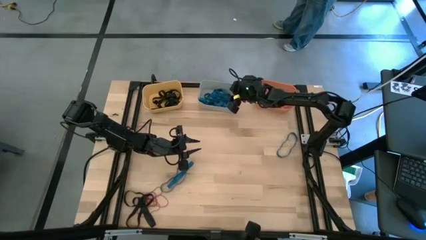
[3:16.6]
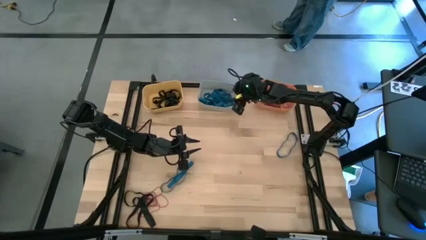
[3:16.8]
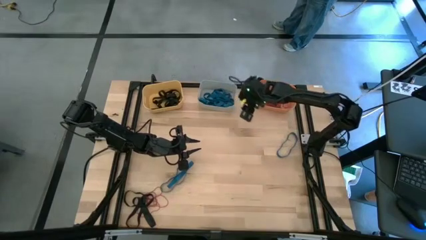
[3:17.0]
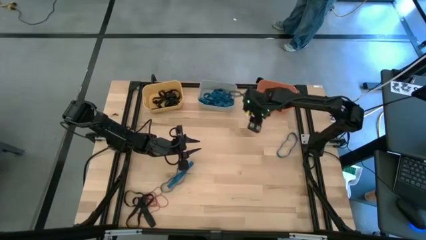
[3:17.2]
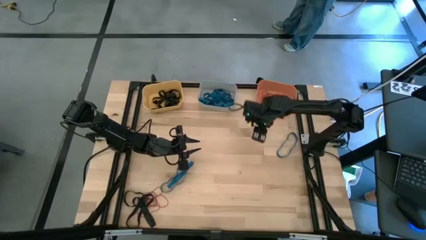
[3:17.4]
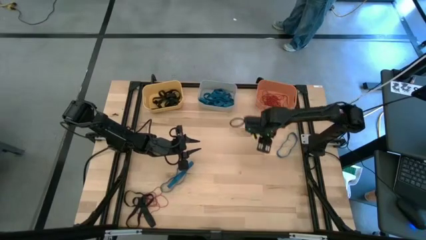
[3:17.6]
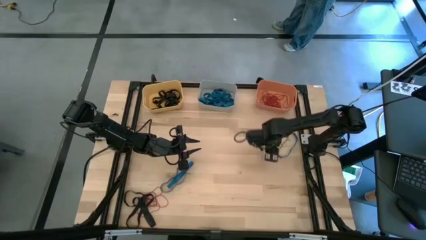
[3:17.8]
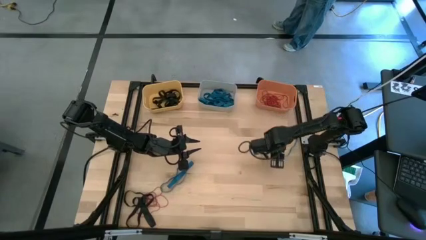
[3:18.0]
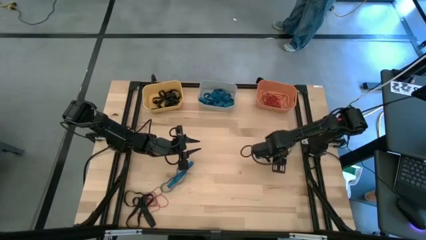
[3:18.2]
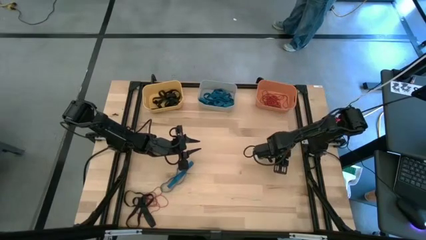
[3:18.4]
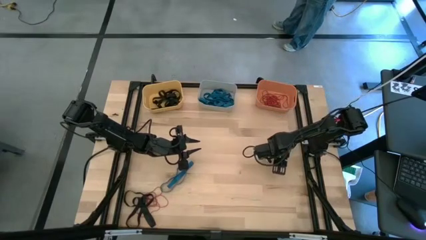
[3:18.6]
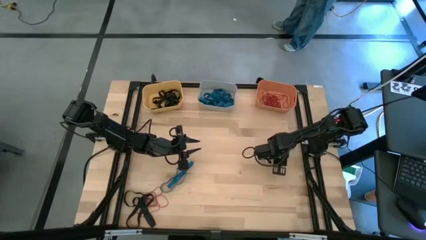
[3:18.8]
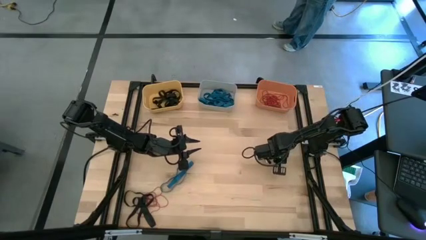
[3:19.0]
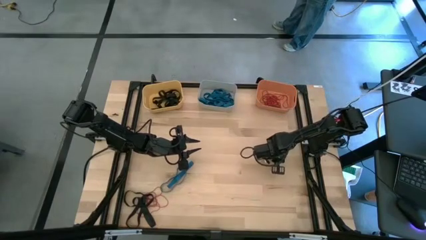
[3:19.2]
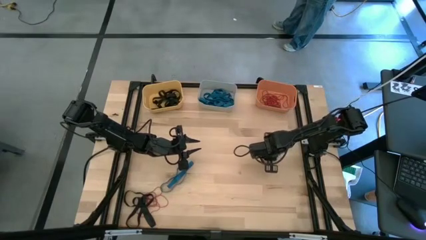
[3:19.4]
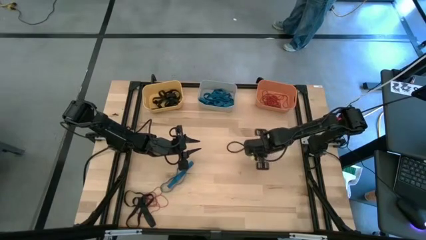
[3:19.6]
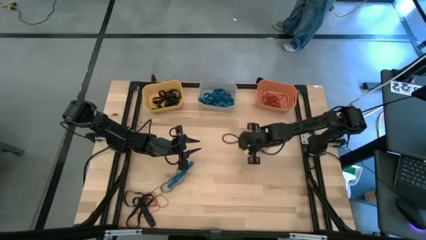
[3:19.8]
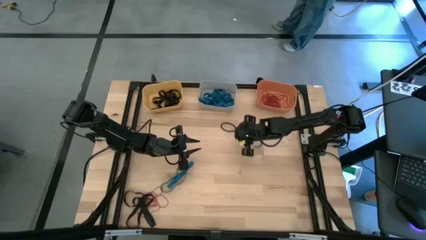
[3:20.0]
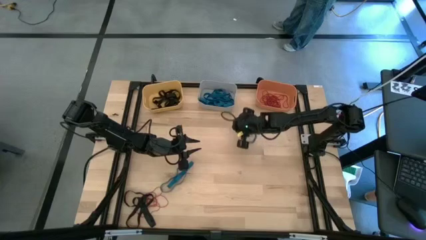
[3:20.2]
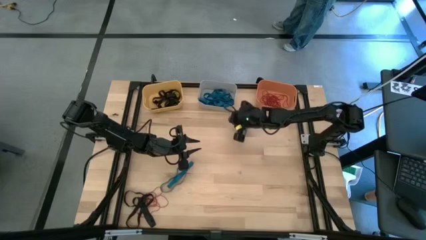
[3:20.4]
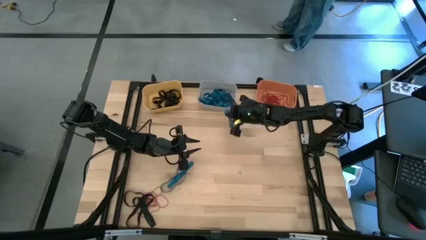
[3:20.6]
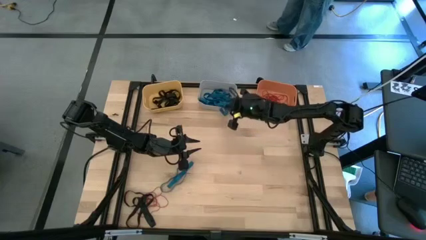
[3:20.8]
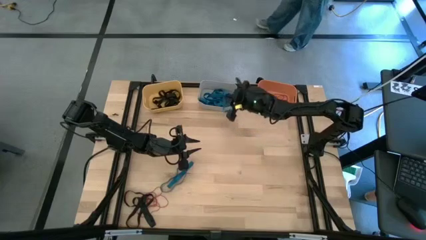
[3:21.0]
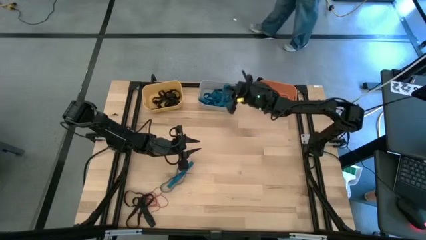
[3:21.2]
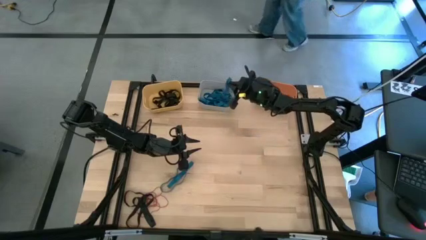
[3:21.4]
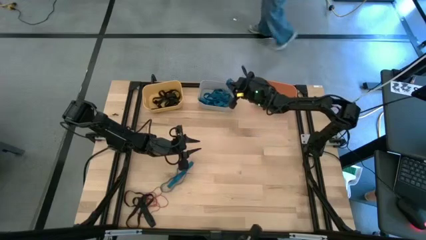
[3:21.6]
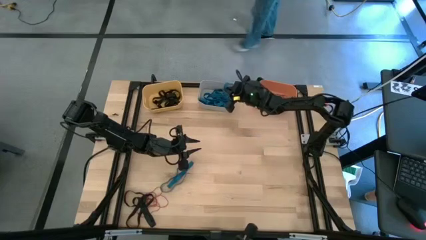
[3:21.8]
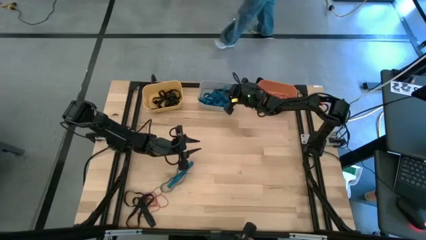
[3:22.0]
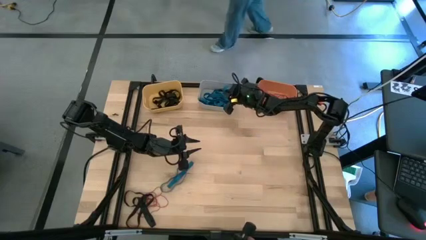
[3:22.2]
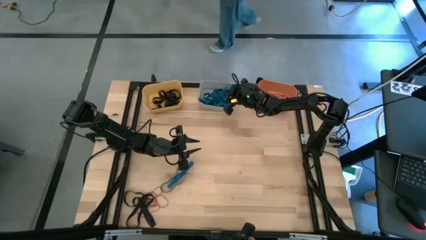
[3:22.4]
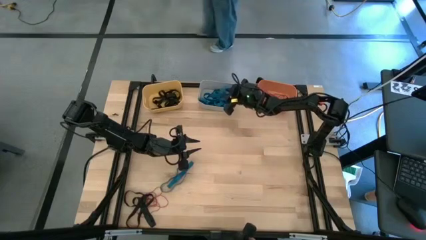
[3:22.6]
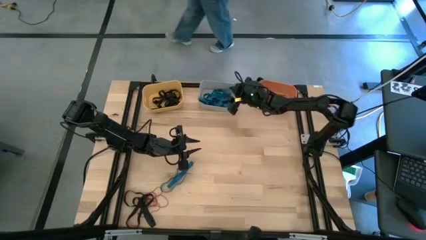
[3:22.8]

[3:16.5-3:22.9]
Task: Sort rubber bands into baskets
Put the blue rubber band into the grey bin

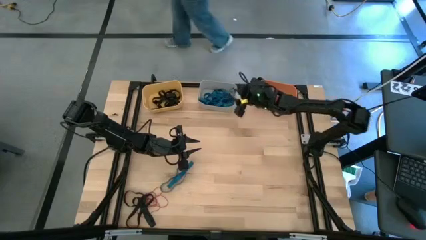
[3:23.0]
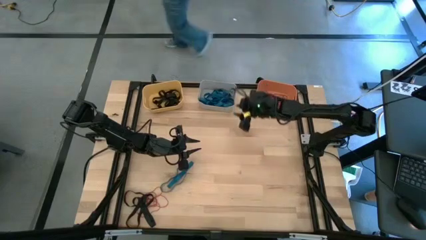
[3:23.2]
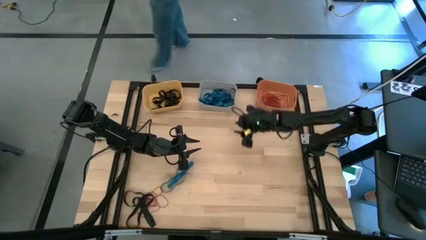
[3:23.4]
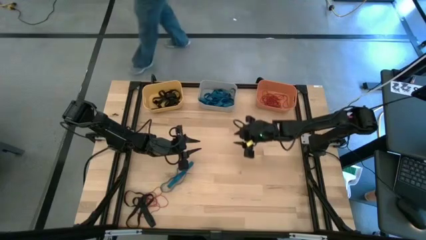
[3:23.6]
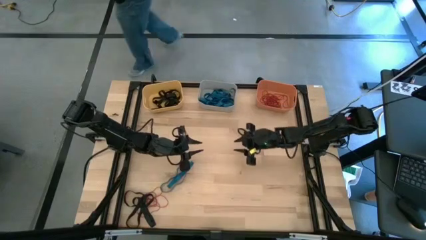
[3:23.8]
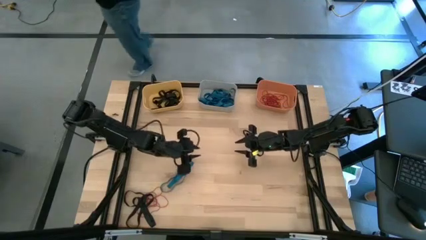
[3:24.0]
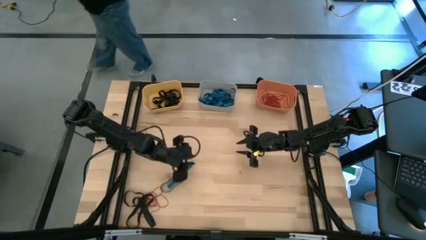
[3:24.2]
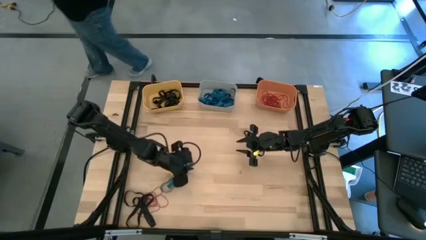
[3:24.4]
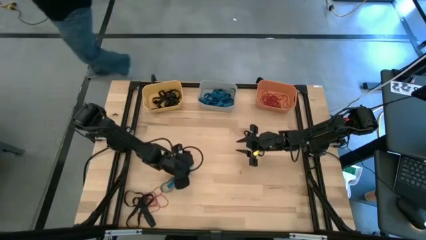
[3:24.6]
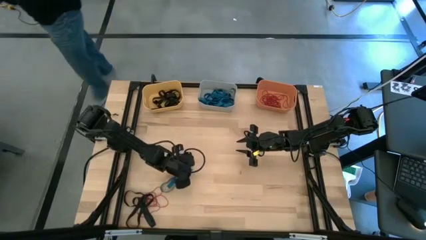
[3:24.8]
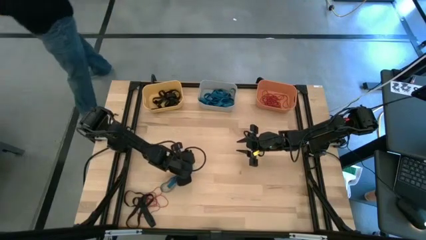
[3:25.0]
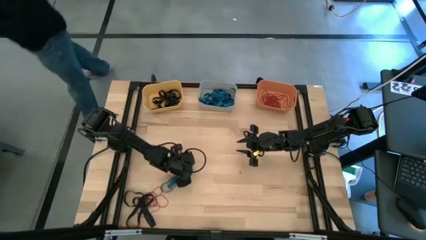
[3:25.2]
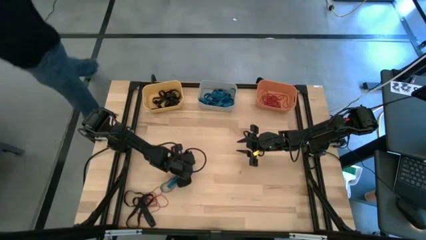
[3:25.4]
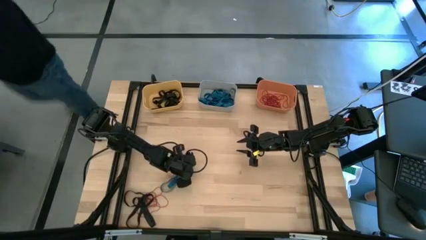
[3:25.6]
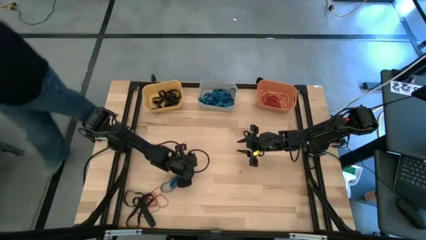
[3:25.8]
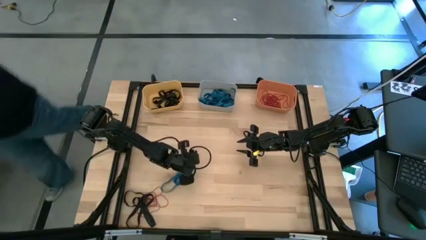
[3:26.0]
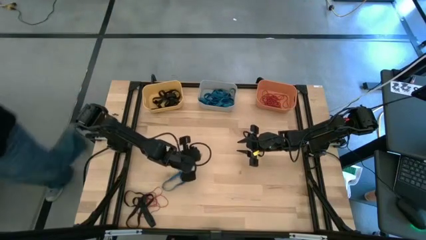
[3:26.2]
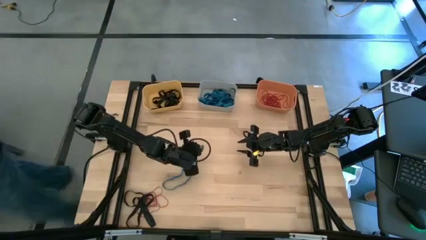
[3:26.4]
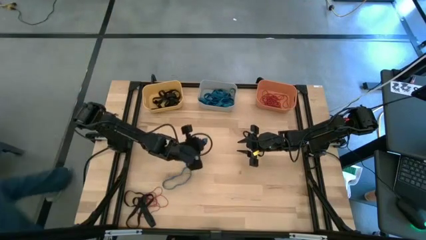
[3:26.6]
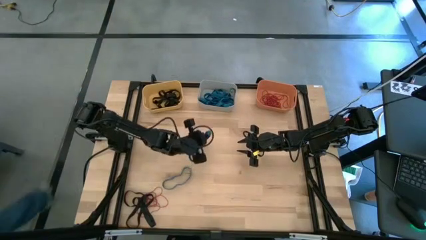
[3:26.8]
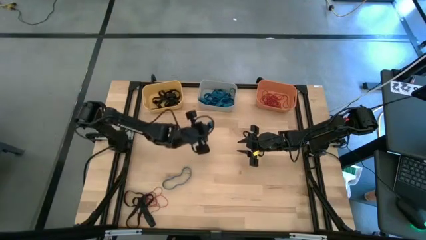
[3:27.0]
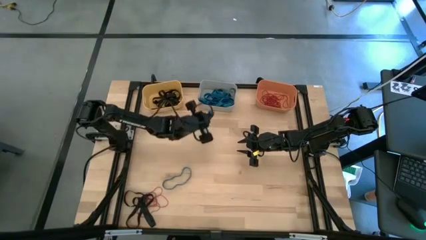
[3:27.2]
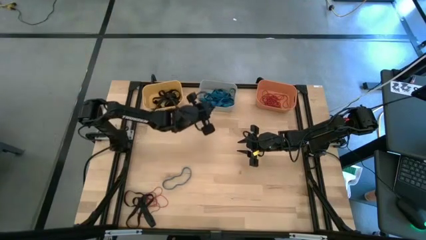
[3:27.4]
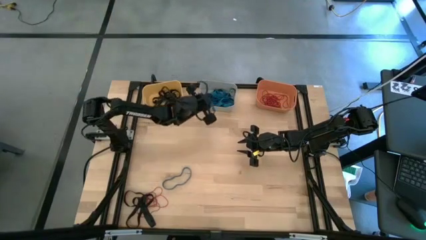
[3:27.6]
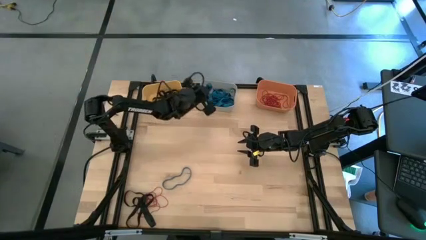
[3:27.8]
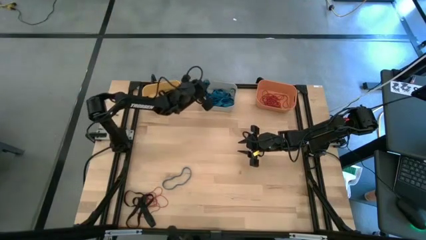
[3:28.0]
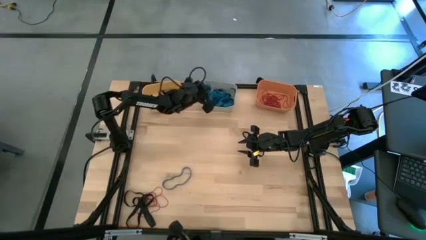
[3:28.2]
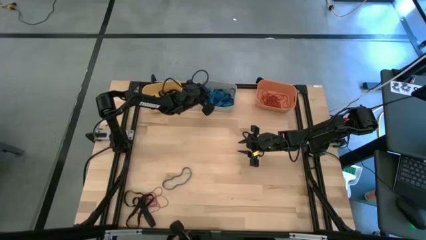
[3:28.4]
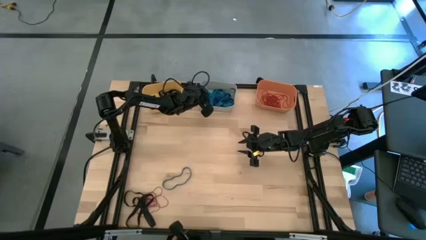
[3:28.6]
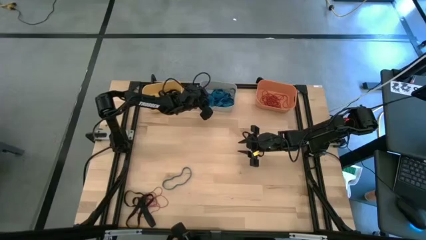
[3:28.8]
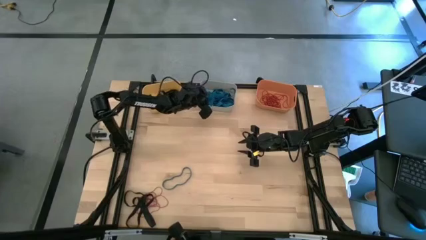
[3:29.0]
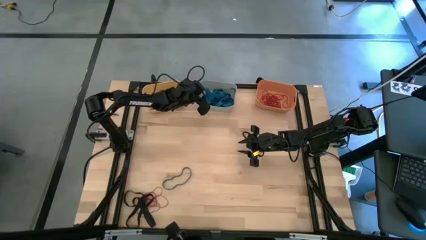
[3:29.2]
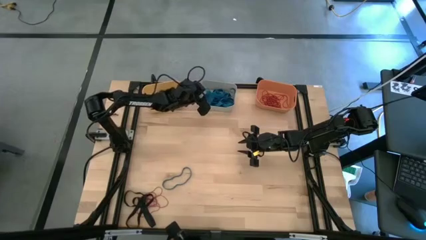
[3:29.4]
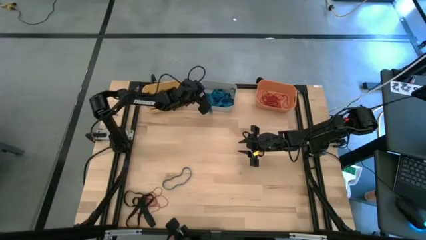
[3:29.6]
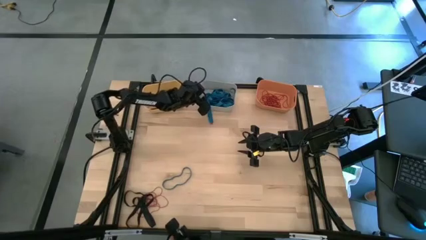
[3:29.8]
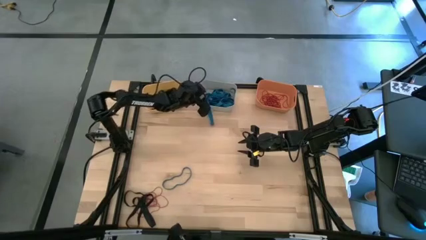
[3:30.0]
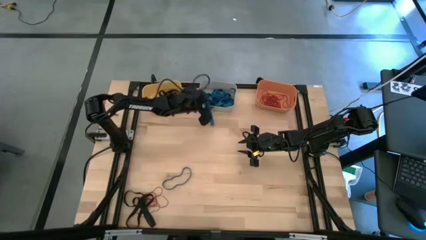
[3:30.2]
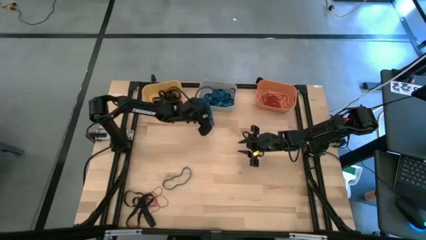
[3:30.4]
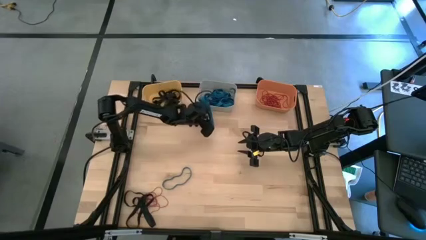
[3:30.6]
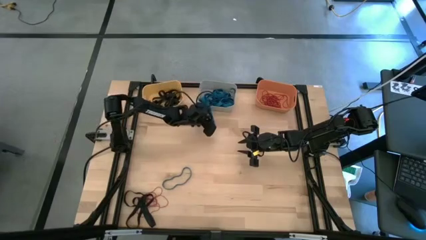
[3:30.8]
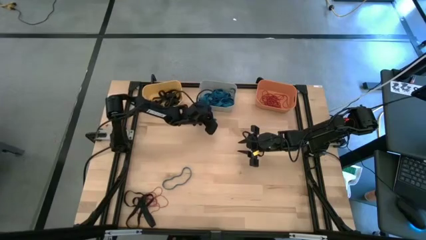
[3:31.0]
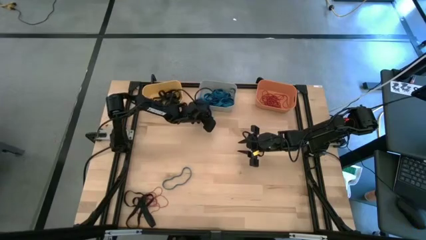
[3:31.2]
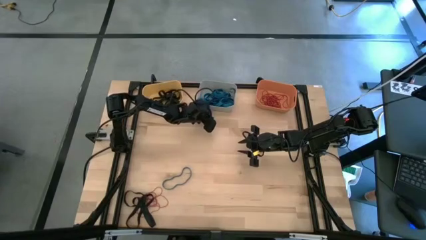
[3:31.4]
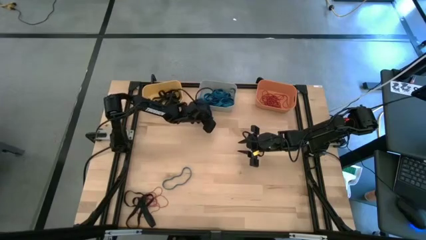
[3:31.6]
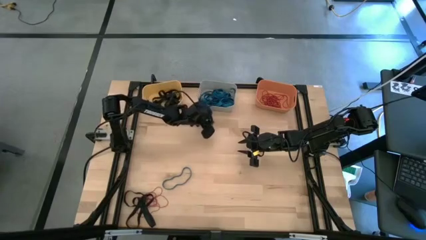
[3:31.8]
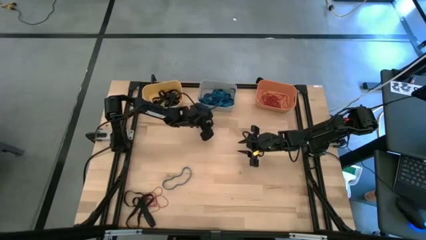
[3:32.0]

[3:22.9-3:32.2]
Put the blue rubber band into the grey bin

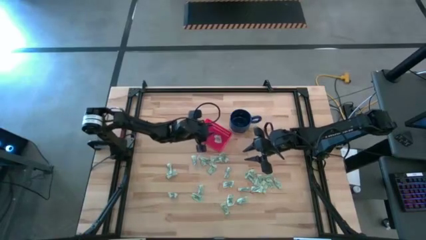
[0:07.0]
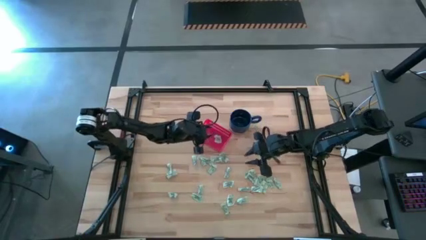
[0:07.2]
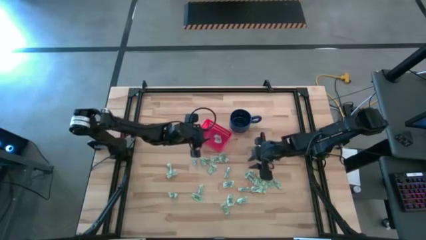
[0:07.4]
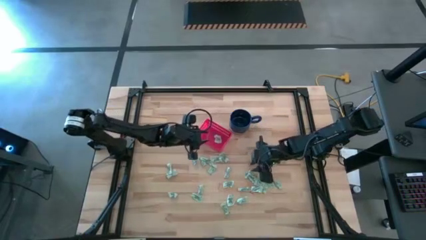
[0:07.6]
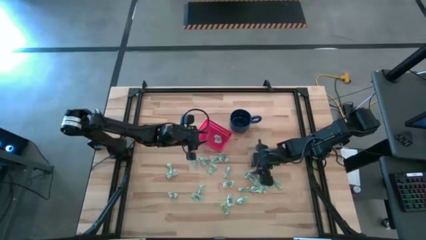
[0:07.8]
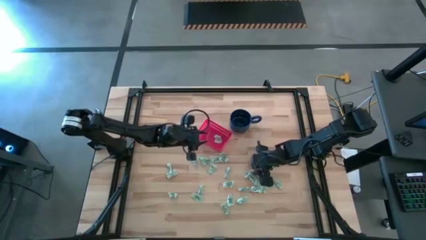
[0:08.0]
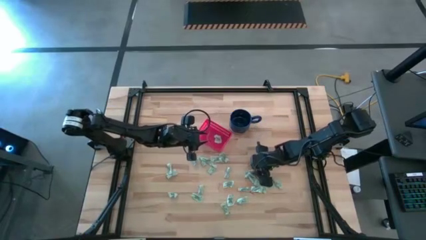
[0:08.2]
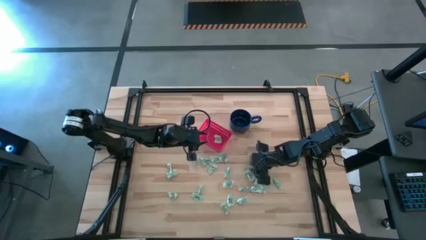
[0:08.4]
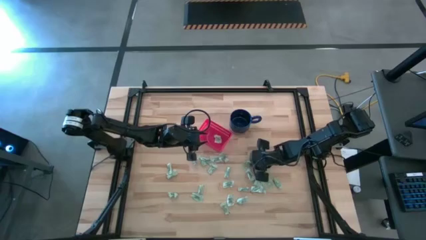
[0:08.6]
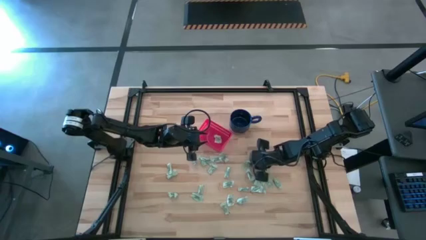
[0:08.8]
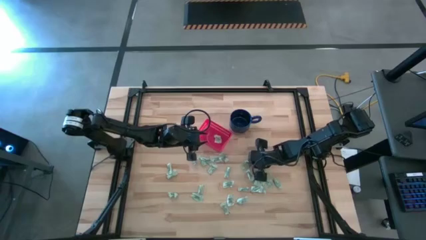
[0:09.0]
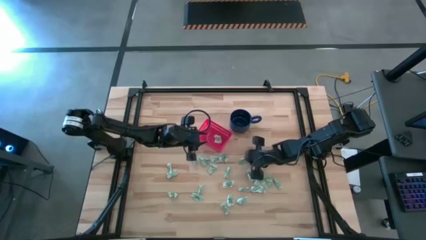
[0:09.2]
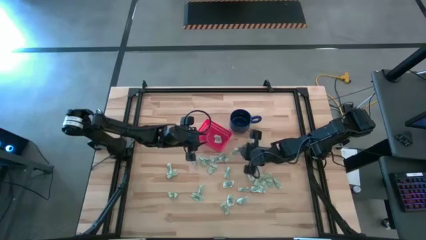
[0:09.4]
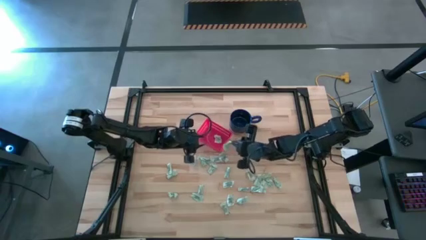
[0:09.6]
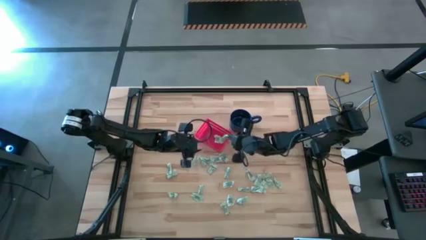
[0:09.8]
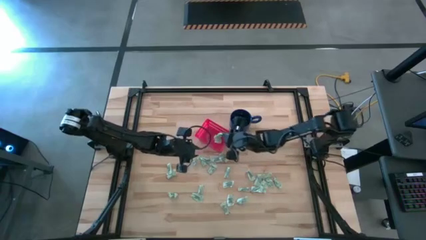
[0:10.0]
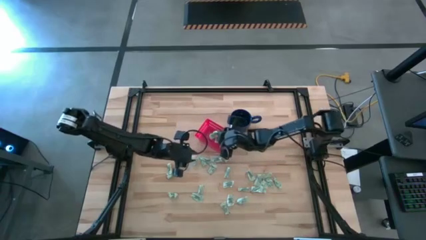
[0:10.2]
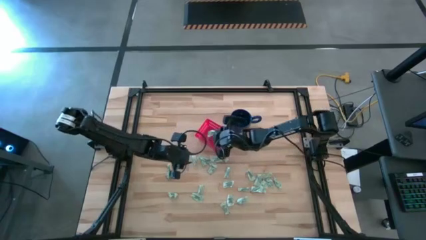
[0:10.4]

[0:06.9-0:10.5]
Task: Pick and place items into bin
Put the stevia packet into the bin
